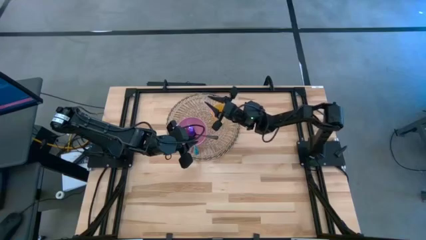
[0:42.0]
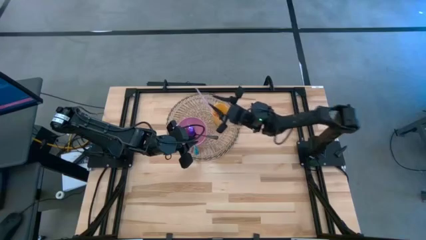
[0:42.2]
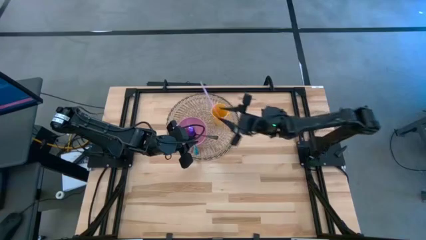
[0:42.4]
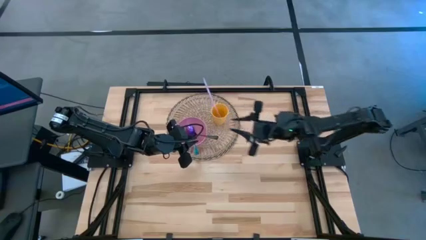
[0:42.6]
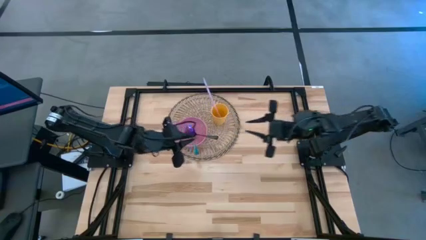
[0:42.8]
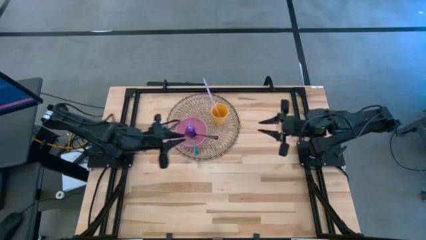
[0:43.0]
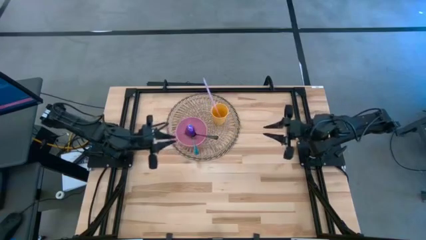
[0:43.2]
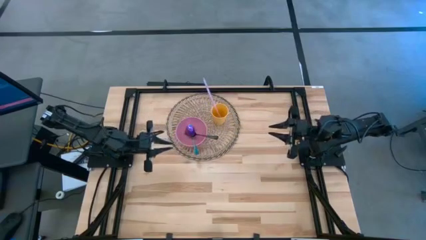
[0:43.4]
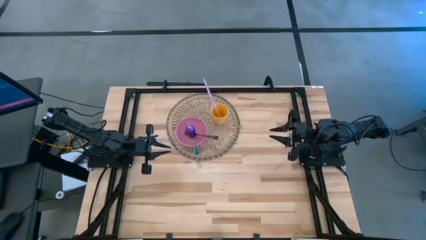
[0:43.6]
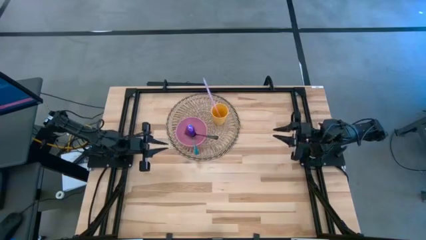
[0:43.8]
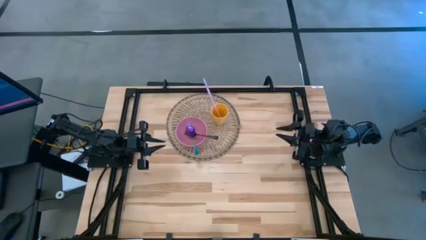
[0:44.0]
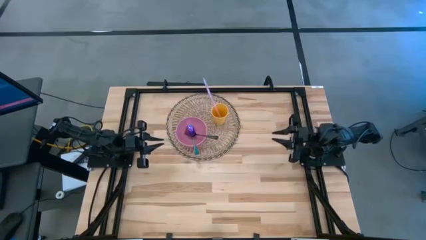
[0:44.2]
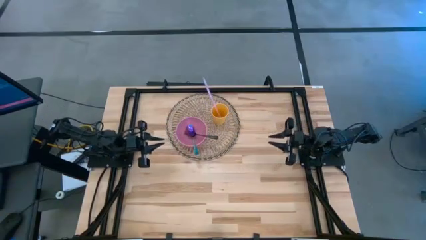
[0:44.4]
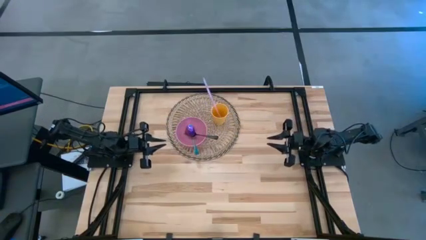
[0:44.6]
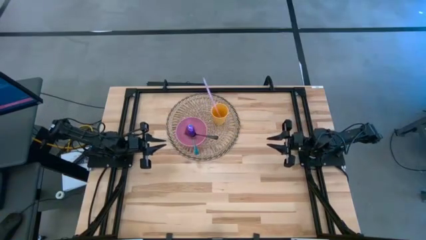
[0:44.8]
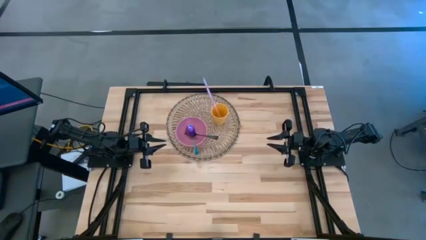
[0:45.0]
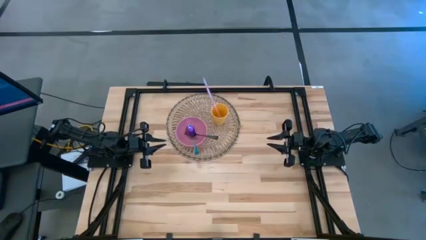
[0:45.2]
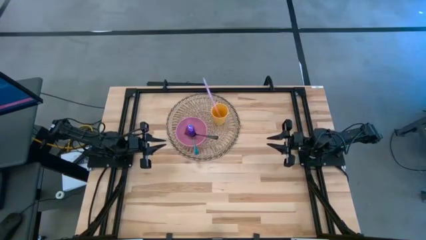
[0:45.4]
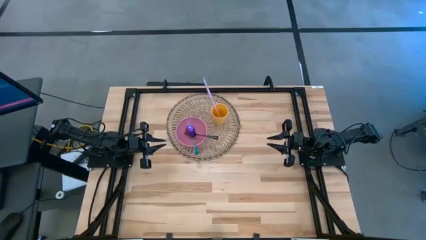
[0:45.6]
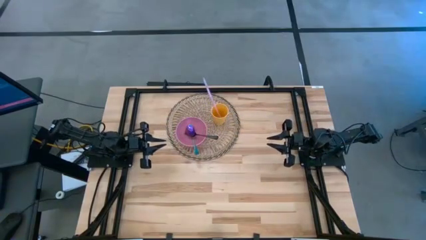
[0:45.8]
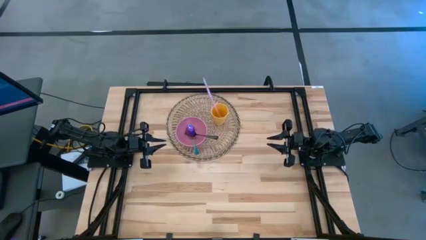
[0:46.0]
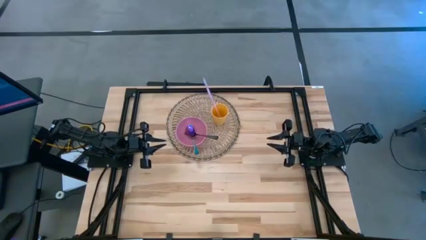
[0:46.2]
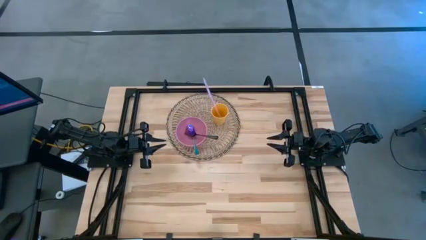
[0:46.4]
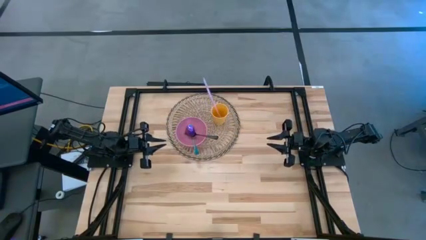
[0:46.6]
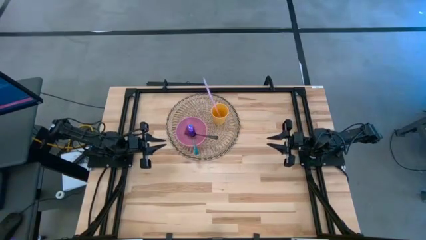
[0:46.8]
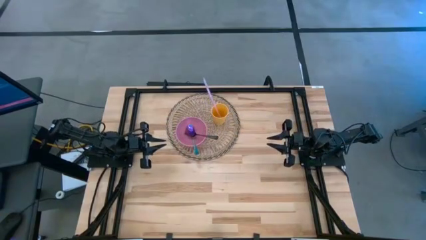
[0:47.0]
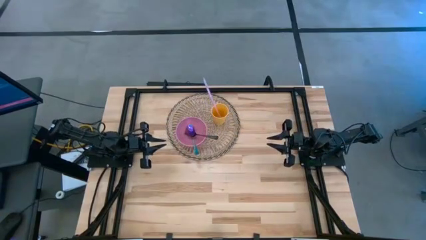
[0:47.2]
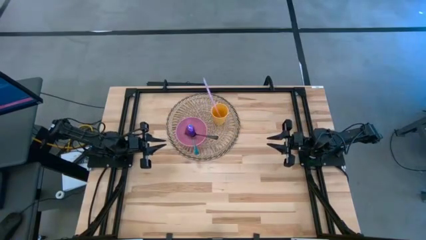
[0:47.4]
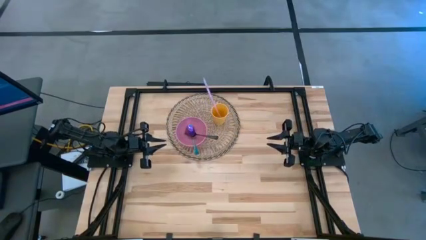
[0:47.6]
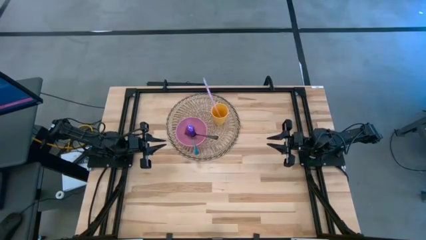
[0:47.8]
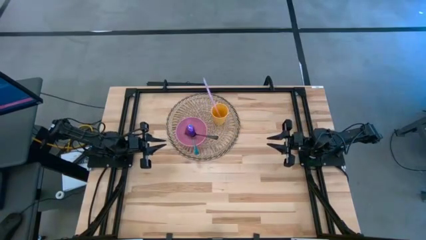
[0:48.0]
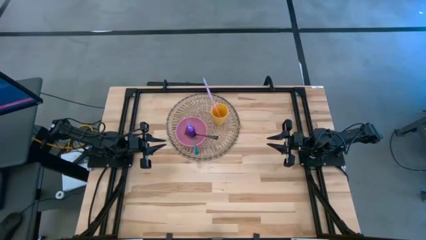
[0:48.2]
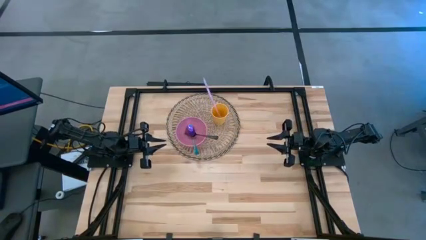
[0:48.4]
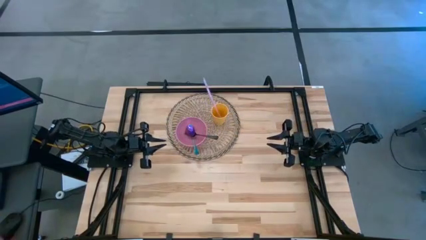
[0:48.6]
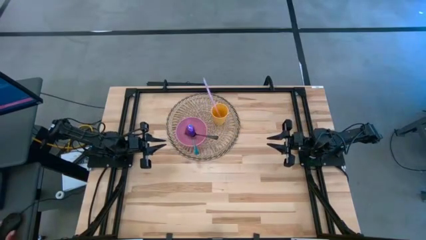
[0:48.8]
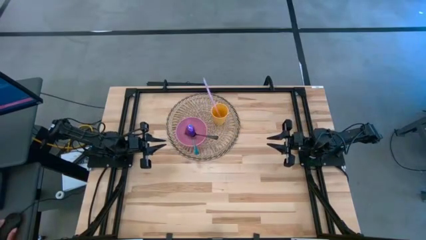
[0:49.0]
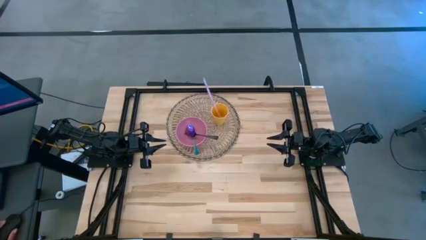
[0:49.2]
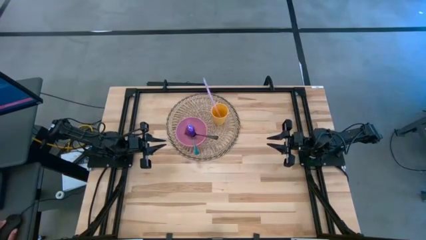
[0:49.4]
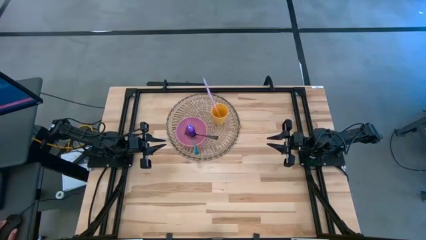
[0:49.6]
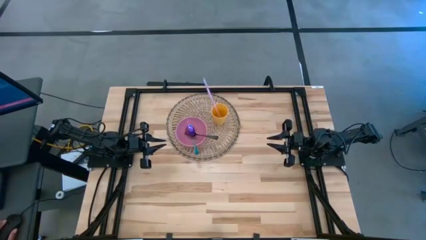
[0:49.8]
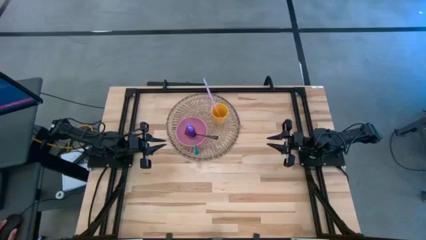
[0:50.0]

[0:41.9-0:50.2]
Task: Pick & Place Utensil
Return to home position
